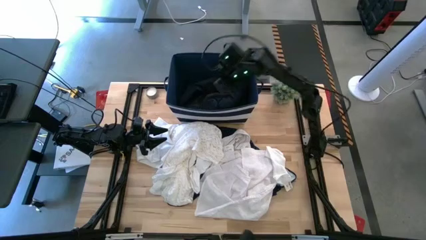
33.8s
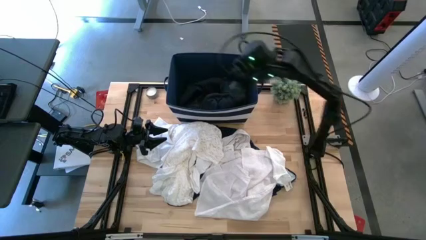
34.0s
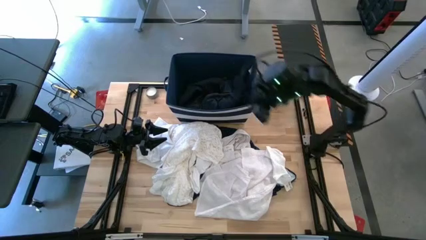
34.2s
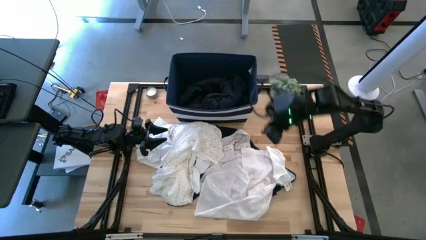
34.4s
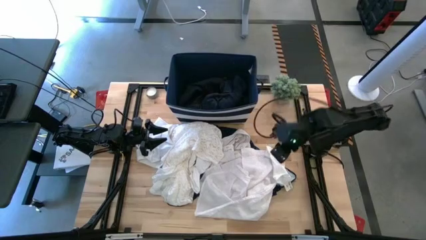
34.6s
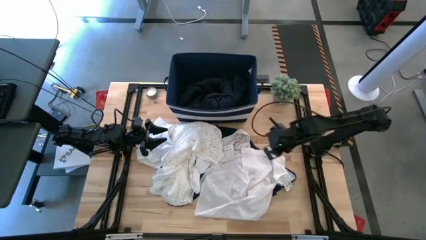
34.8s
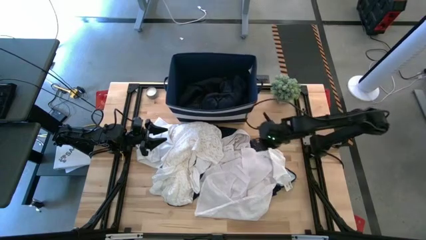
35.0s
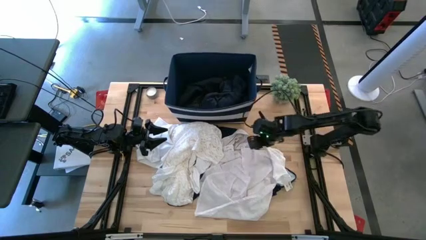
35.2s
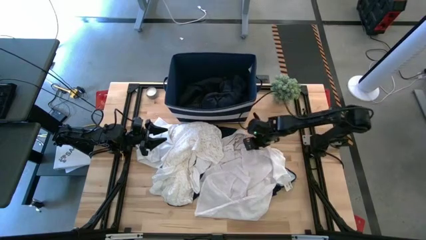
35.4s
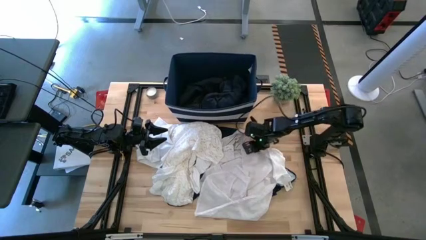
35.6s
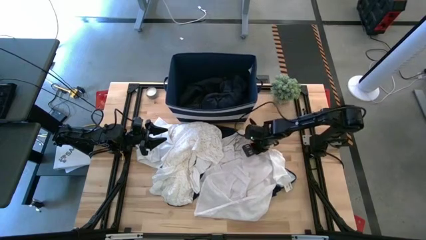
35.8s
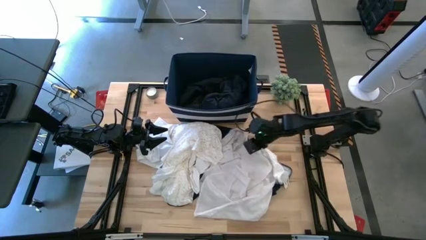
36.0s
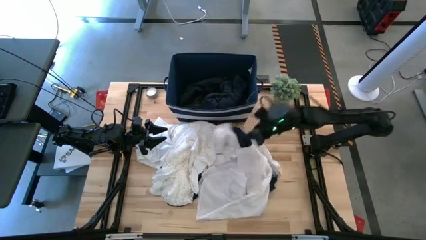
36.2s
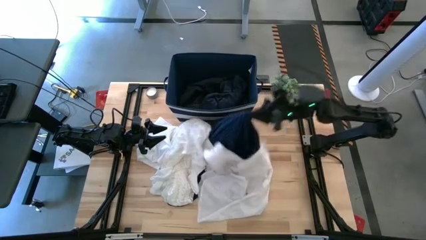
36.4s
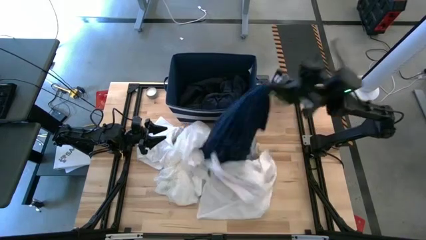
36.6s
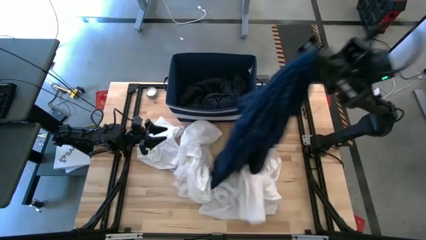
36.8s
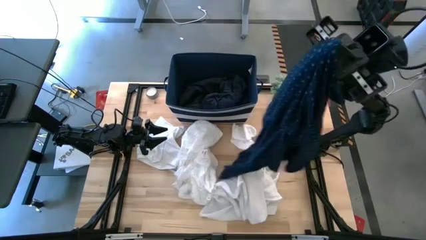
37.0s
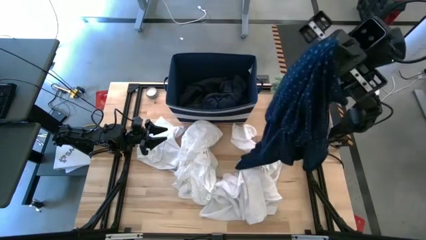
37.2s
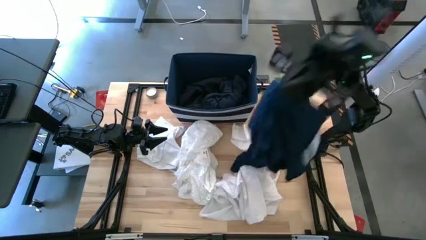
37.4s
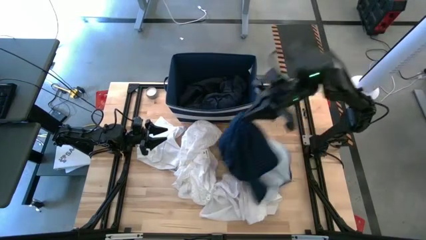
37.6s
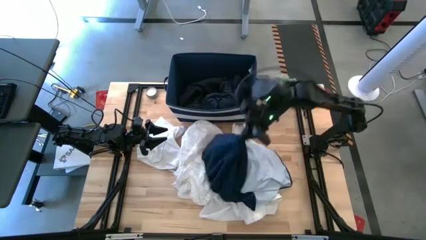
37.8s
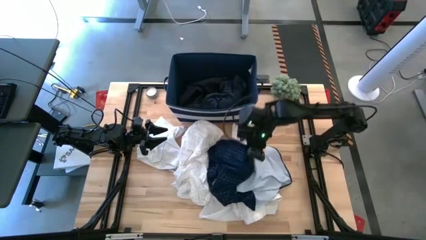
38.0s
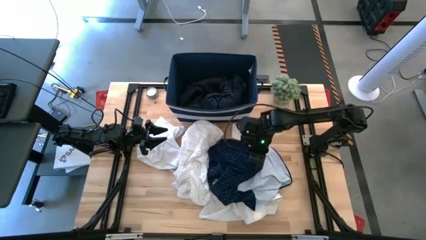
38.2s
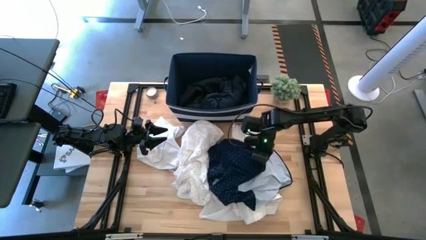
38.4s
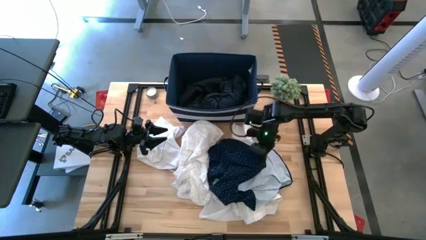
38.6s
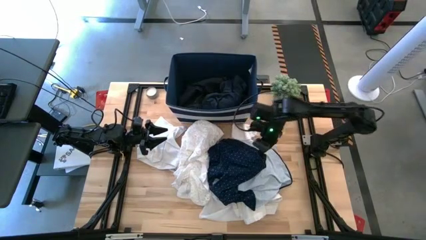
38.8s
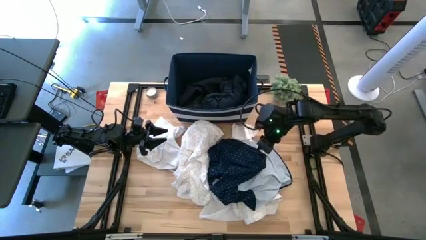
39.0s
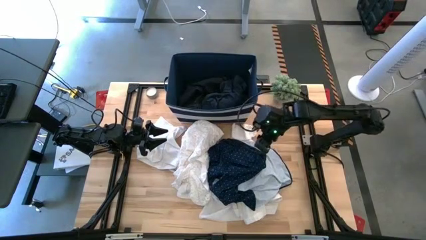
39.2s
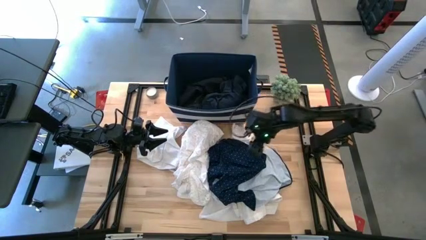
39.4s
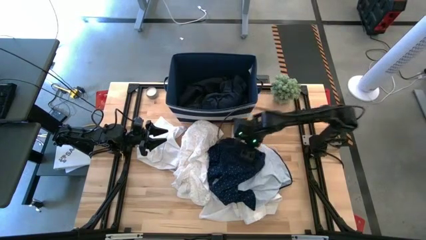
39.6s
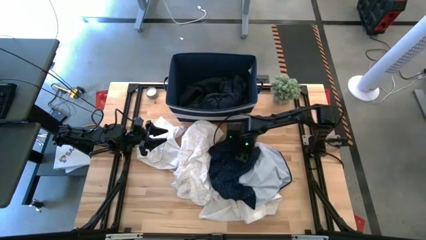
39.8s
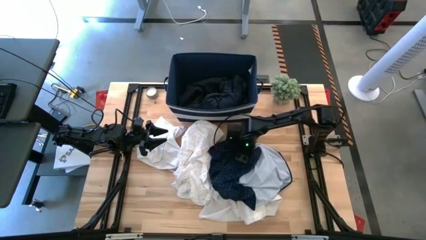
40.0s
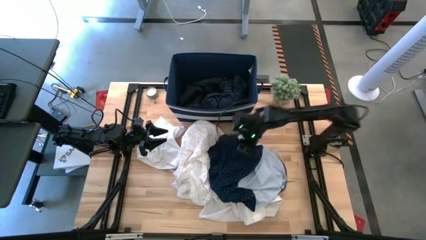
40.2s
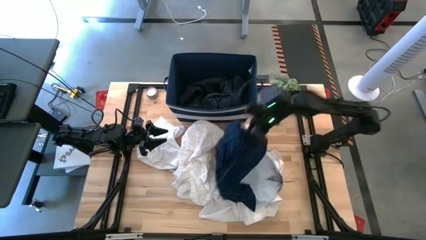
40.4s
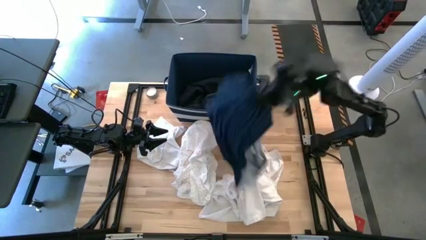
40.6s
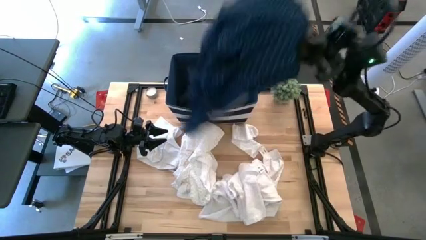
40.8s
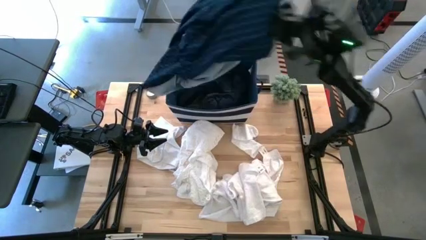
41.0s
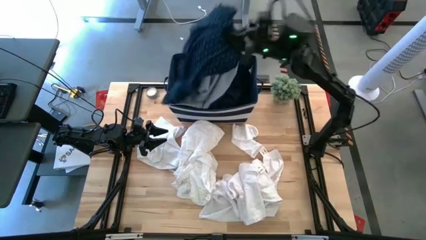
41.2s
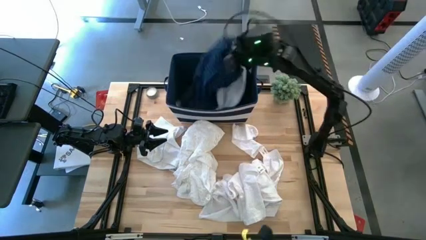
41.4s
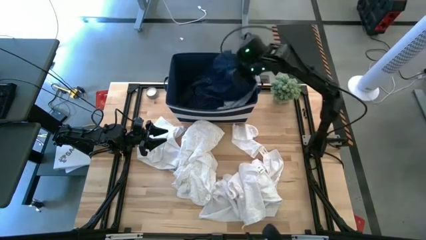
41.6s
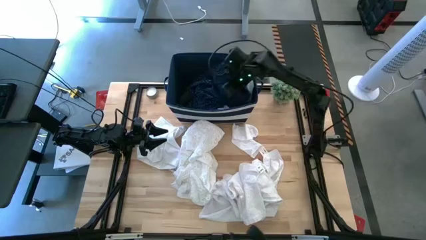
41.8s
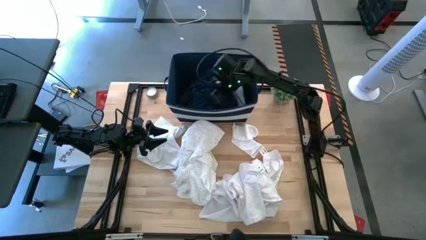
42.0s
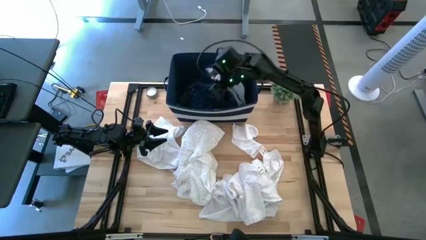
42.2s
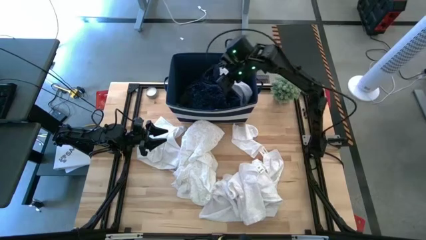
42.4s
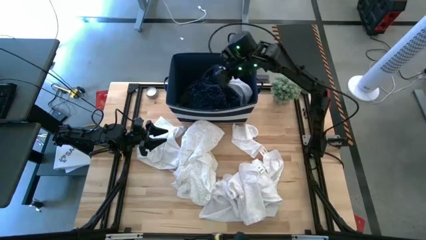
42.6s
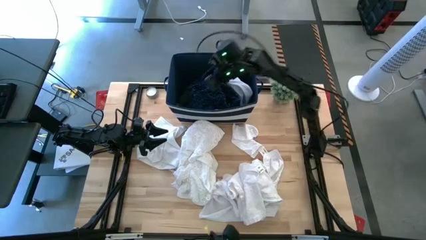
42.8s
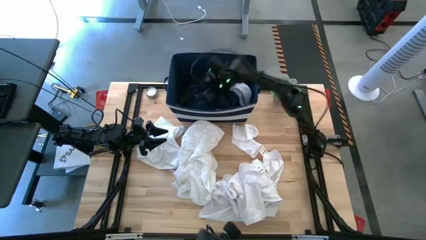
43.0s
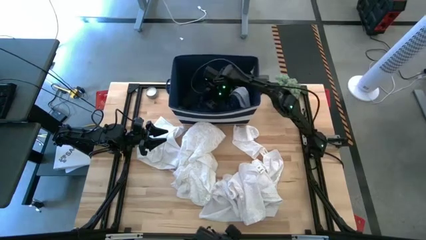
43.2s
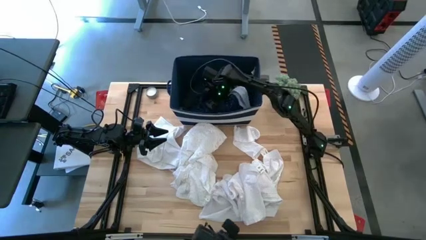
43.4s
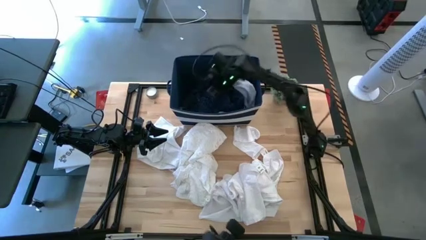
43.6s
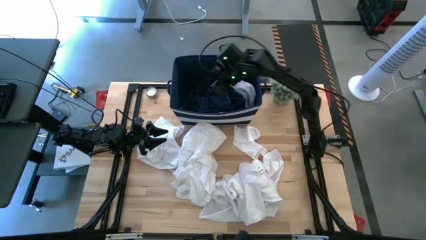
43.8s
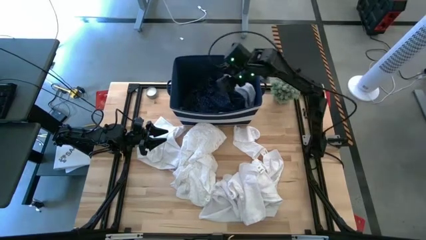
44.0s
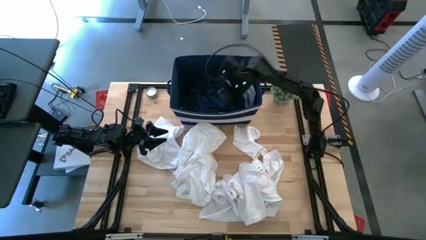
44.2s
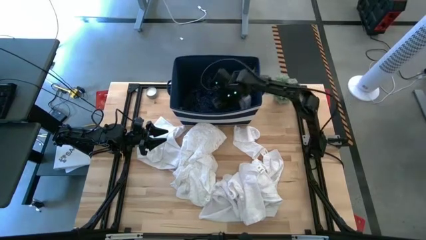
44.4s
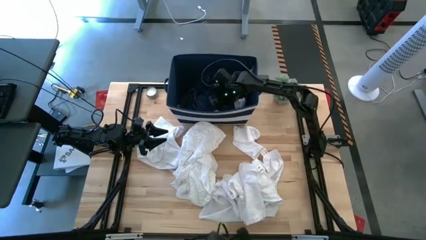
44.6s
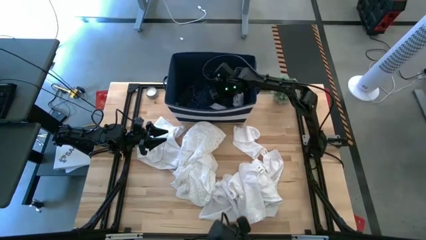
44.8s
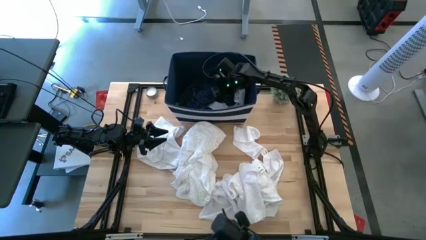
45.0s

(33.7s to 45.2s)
Task: Sort clothes
Put the blue dress into the blue bin

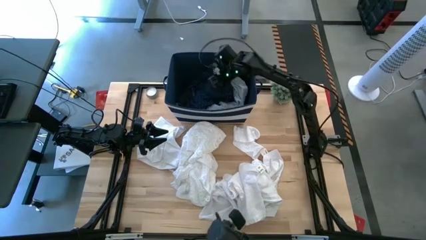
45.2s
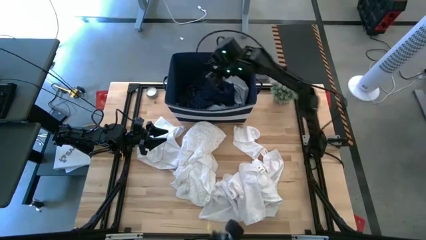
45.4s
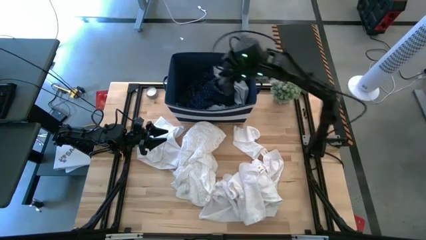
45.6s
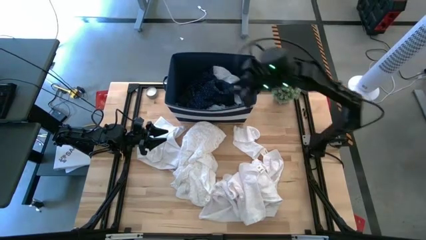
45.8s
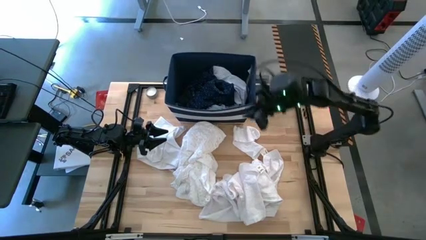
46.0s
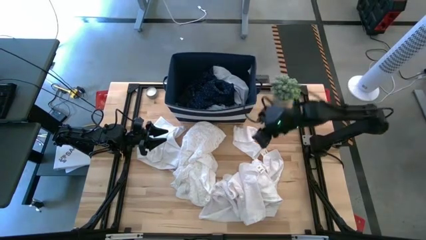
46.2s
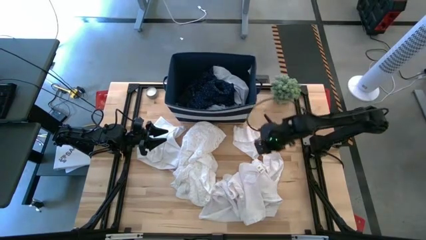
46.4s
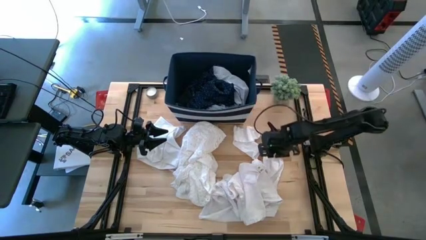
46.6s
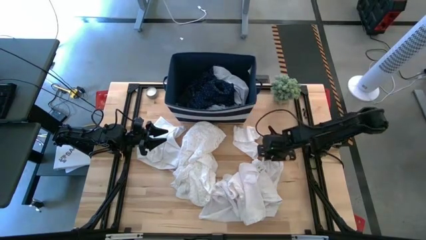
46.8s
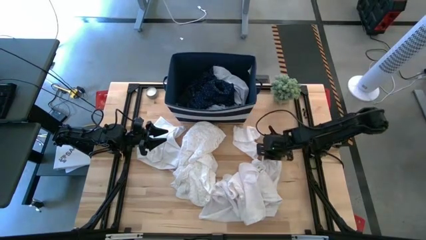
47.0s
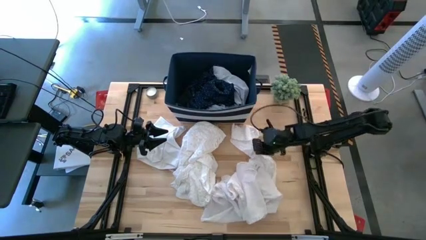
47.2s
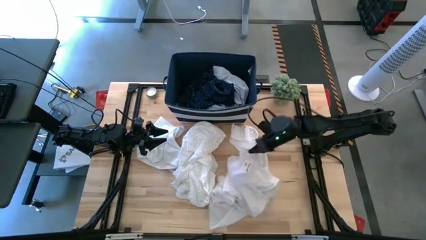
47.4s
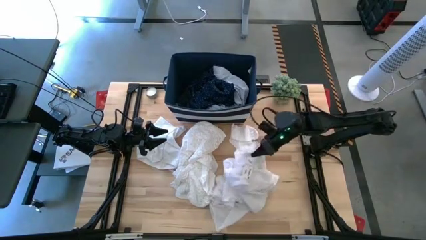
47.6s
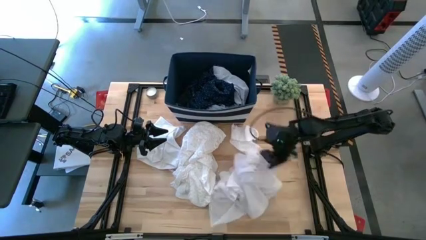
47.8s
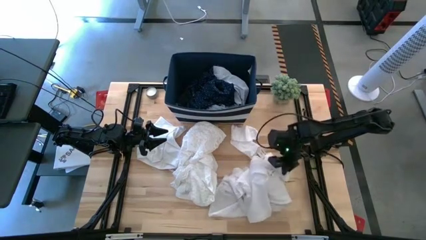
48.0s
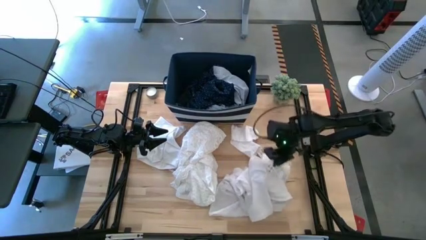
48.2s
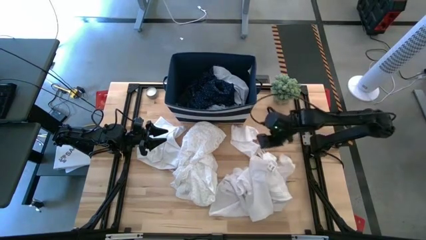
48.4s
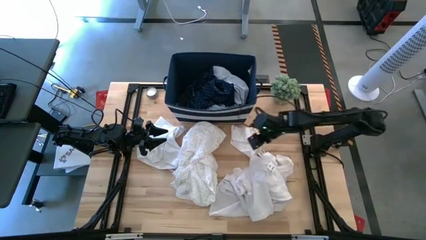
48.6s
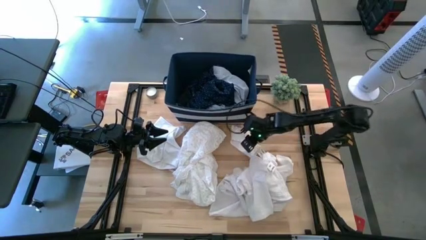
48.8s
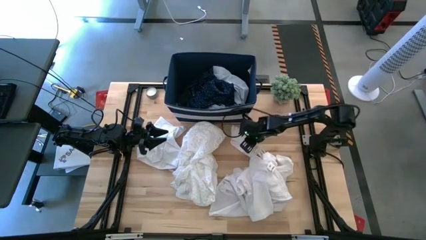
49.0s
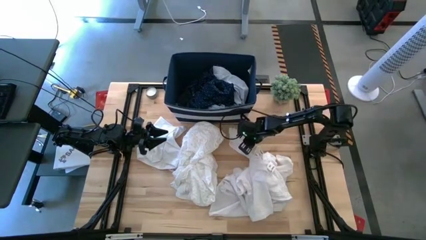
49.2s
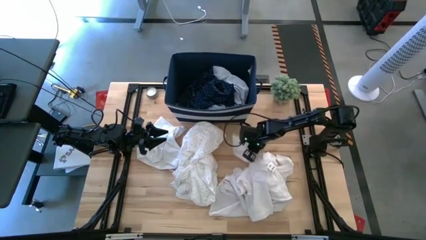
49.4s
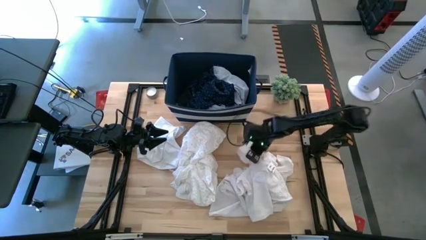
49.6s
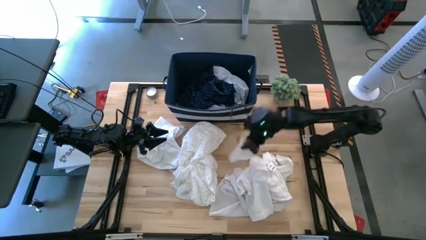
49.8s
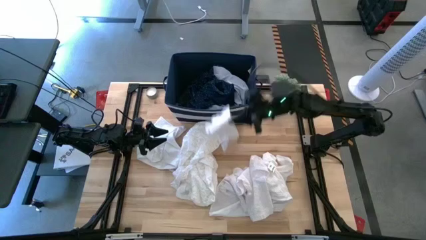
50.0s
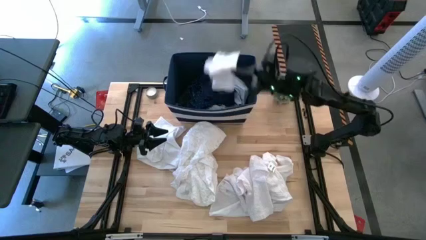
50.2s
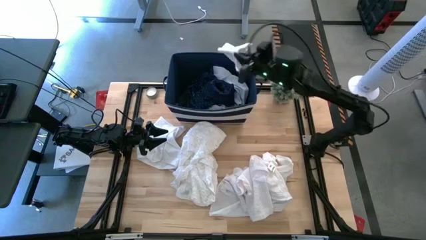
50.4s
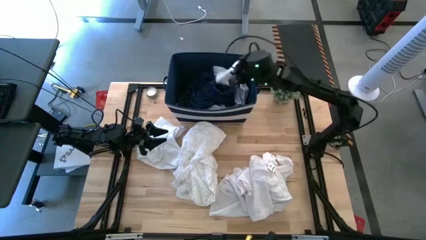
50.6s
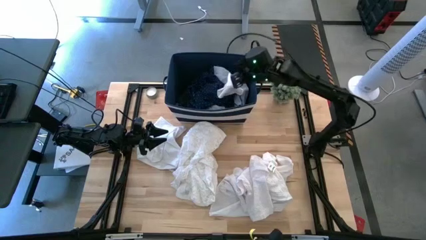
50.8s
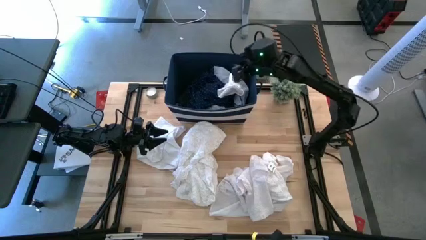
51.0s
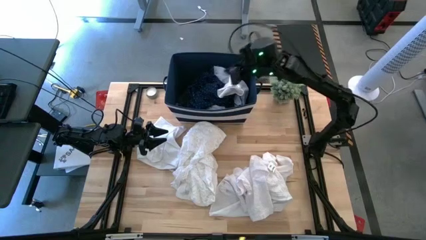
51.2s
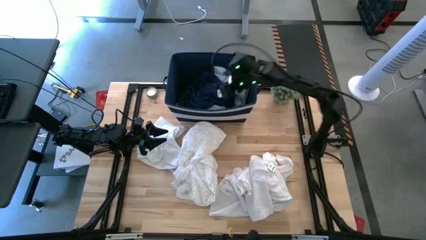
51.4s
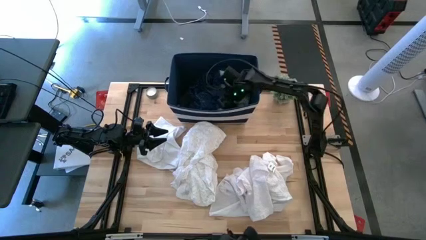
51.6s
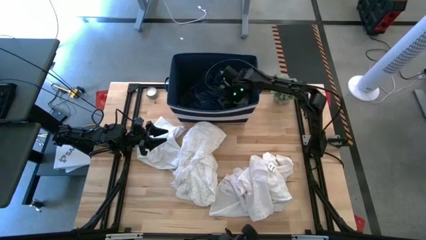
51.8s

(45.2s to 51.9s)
Put the white handkerchief into the blue bin
